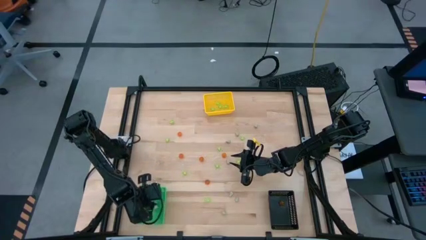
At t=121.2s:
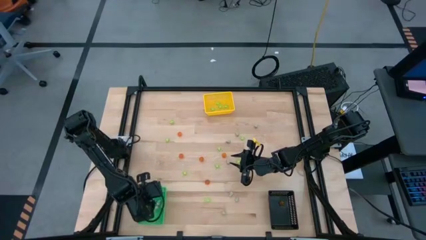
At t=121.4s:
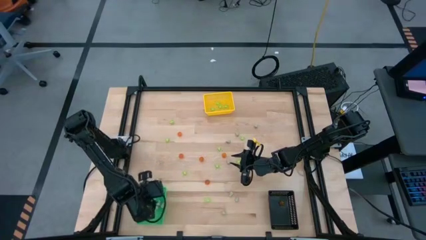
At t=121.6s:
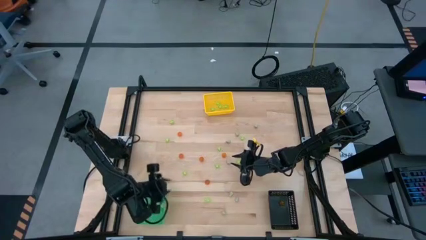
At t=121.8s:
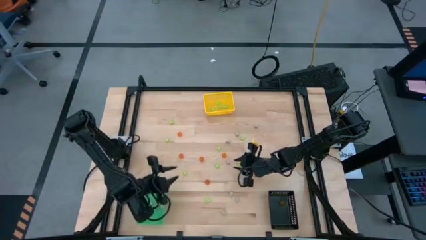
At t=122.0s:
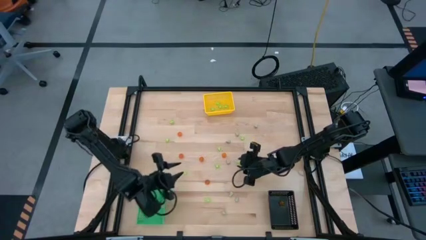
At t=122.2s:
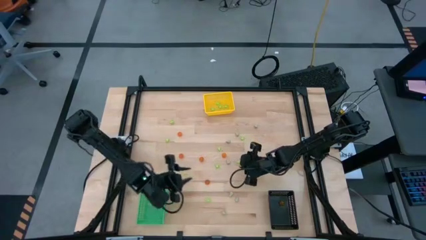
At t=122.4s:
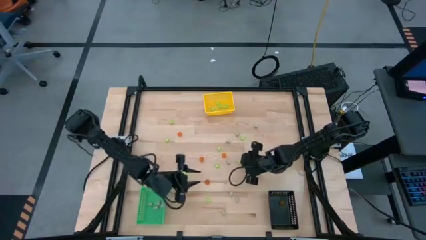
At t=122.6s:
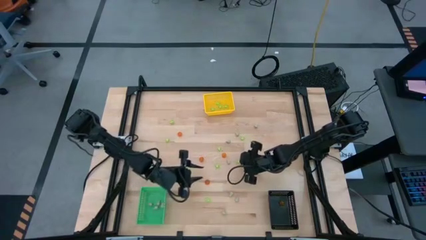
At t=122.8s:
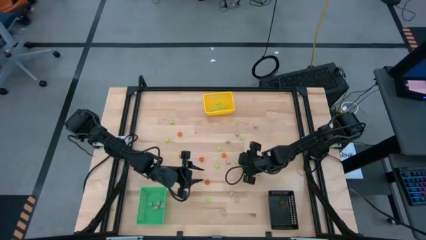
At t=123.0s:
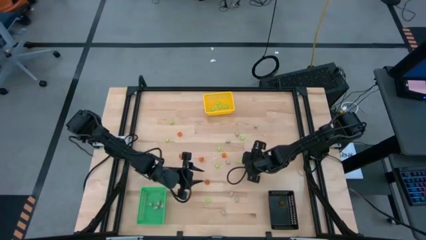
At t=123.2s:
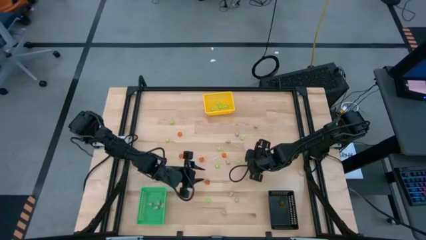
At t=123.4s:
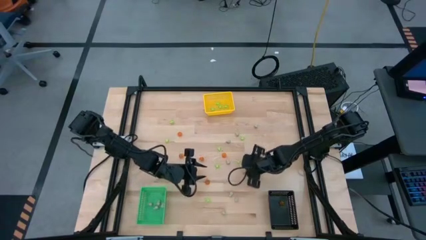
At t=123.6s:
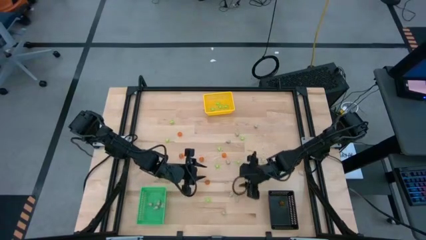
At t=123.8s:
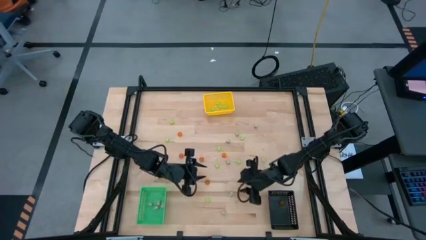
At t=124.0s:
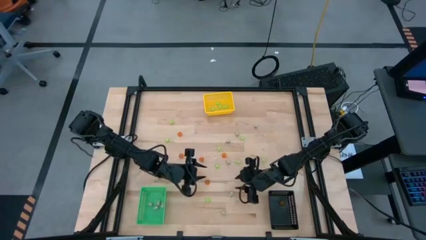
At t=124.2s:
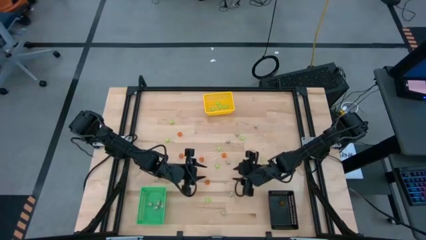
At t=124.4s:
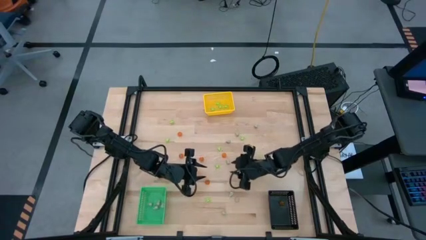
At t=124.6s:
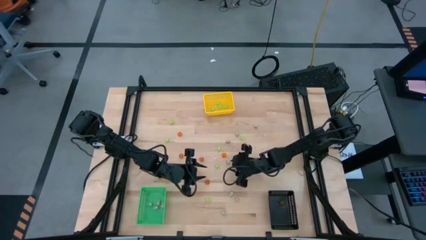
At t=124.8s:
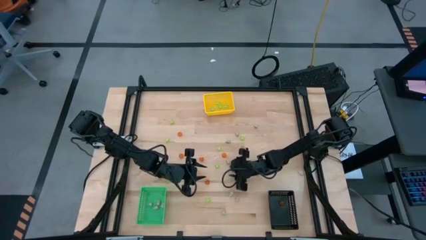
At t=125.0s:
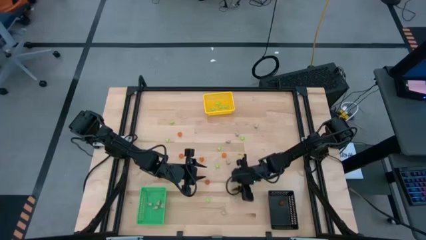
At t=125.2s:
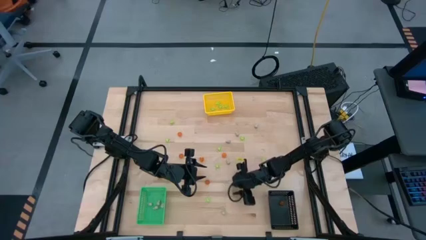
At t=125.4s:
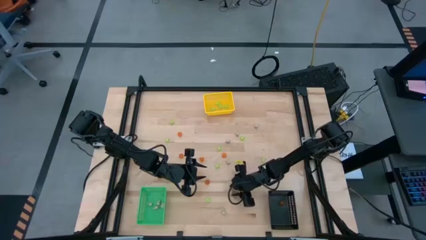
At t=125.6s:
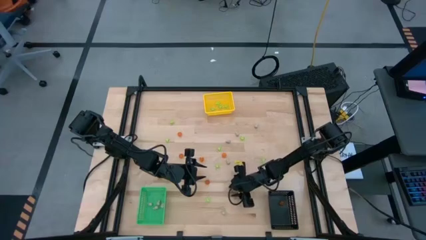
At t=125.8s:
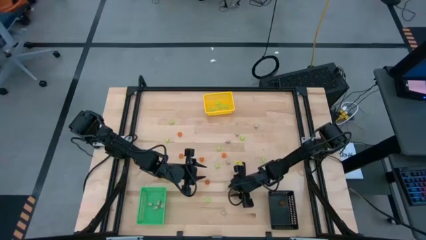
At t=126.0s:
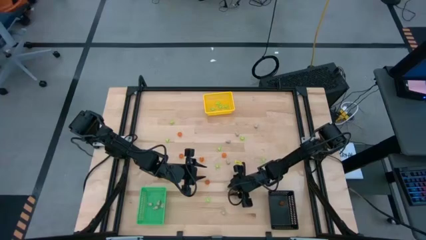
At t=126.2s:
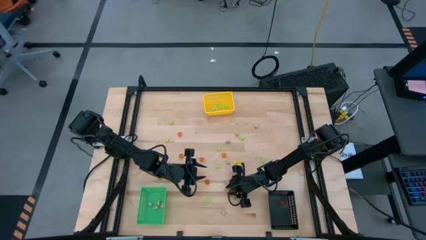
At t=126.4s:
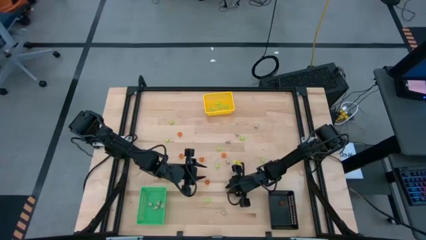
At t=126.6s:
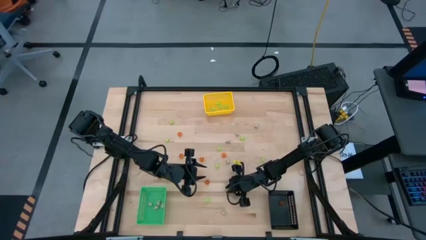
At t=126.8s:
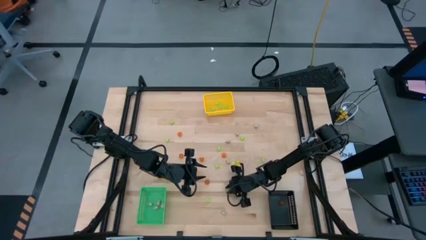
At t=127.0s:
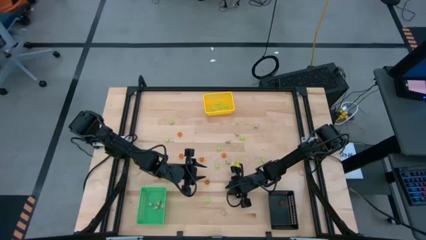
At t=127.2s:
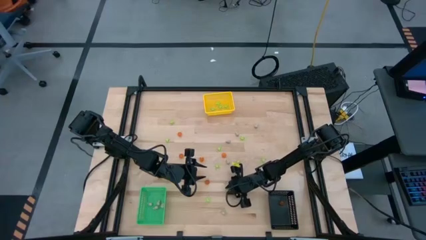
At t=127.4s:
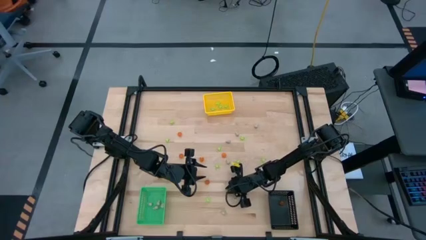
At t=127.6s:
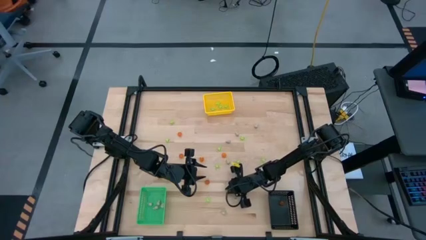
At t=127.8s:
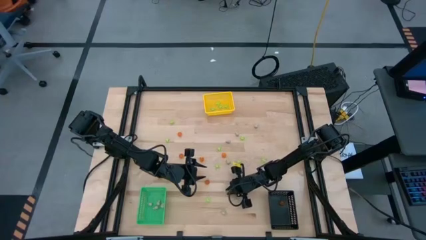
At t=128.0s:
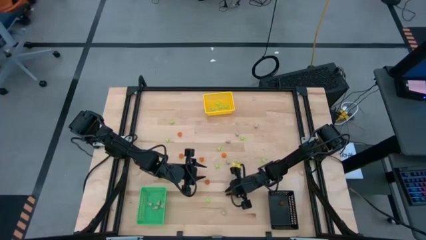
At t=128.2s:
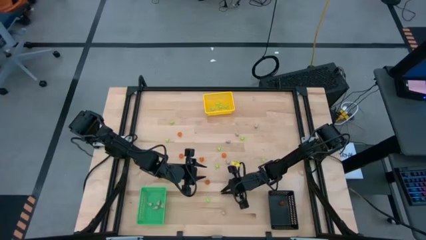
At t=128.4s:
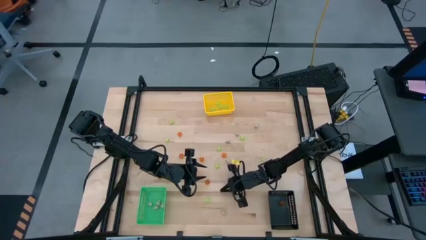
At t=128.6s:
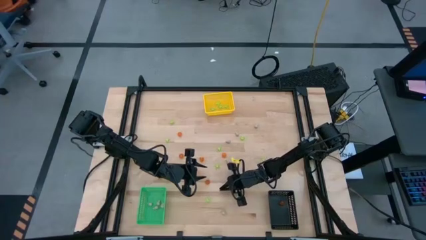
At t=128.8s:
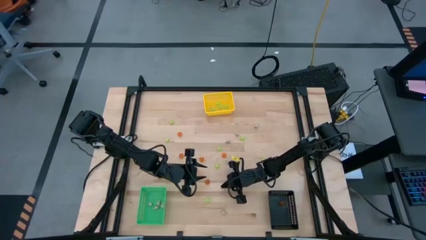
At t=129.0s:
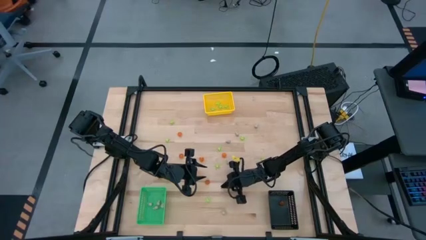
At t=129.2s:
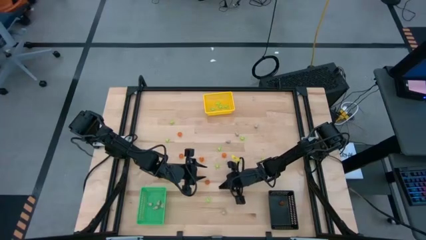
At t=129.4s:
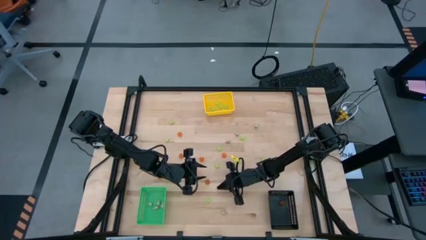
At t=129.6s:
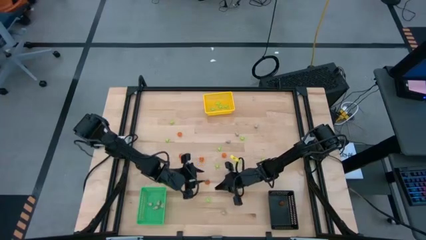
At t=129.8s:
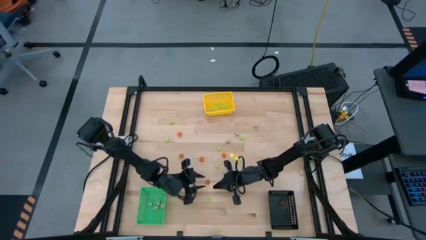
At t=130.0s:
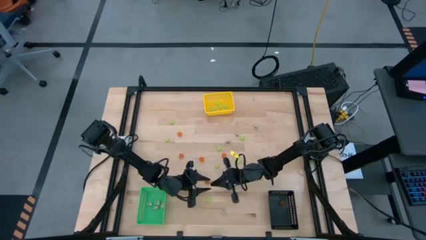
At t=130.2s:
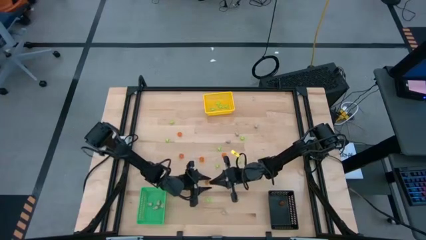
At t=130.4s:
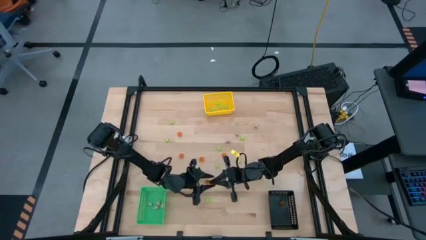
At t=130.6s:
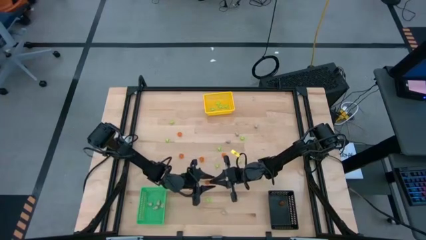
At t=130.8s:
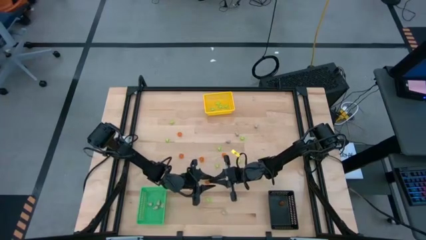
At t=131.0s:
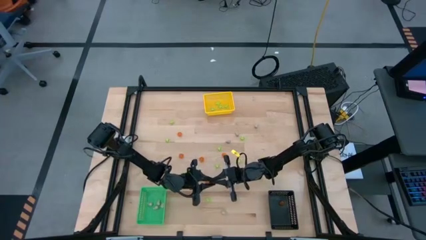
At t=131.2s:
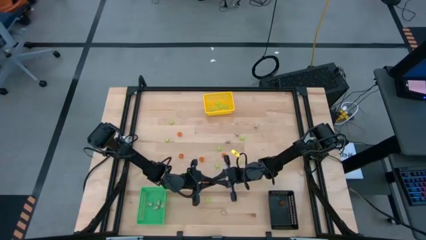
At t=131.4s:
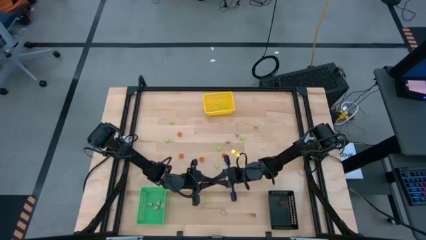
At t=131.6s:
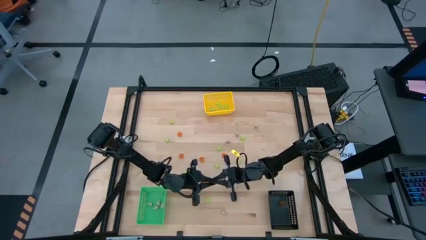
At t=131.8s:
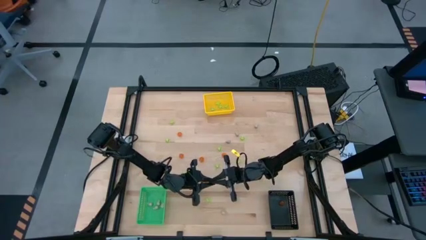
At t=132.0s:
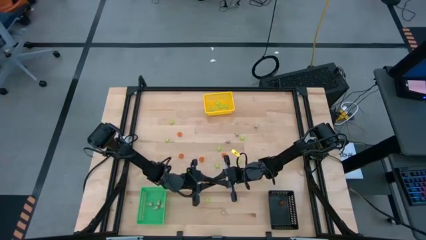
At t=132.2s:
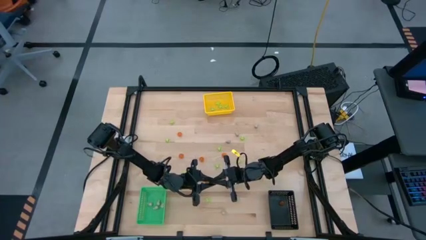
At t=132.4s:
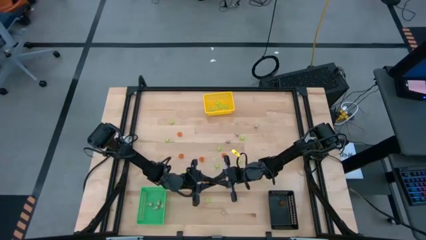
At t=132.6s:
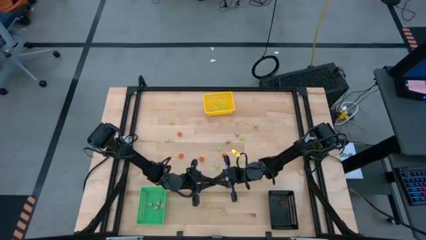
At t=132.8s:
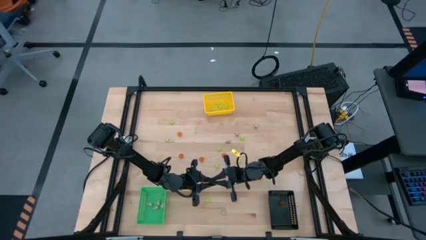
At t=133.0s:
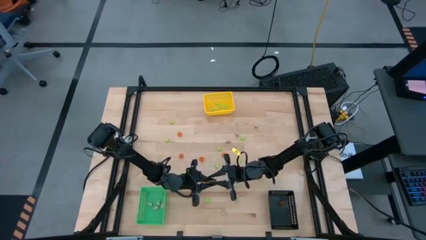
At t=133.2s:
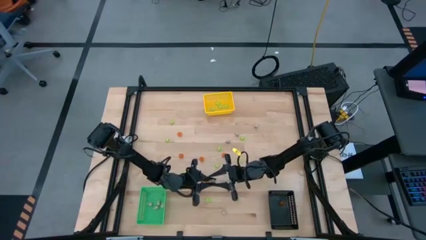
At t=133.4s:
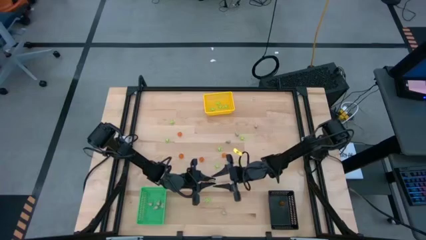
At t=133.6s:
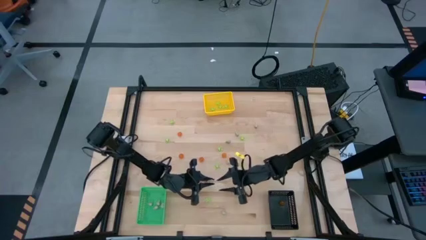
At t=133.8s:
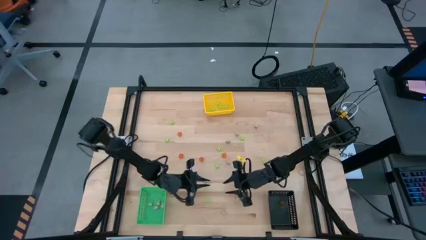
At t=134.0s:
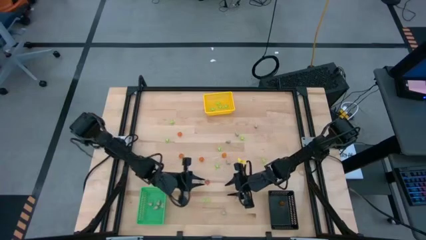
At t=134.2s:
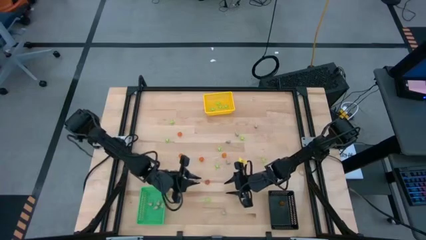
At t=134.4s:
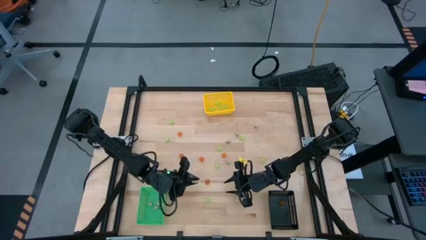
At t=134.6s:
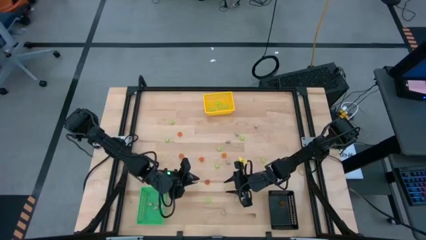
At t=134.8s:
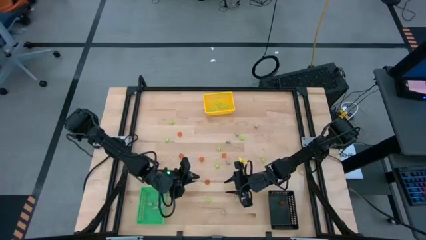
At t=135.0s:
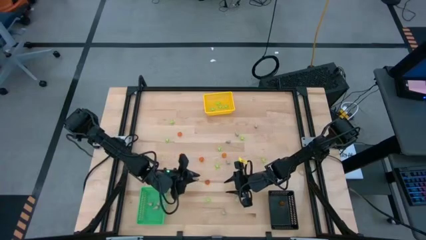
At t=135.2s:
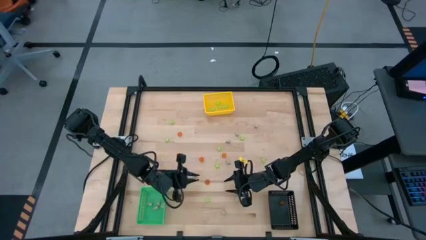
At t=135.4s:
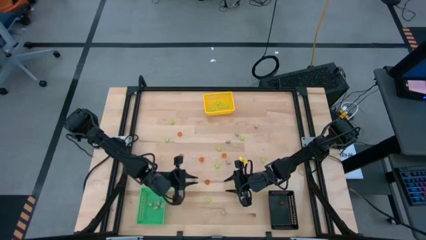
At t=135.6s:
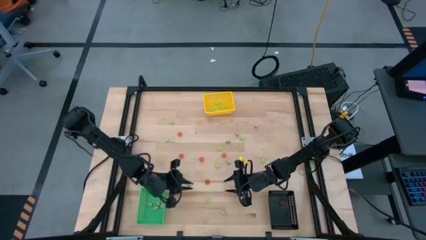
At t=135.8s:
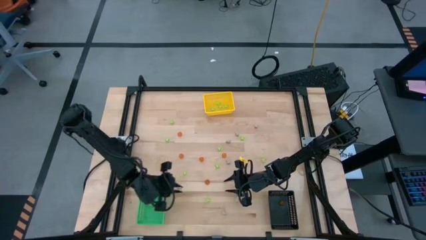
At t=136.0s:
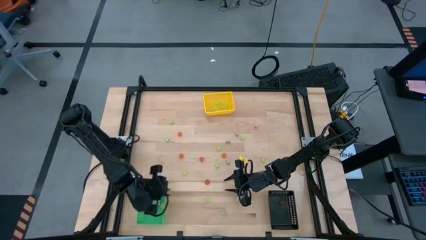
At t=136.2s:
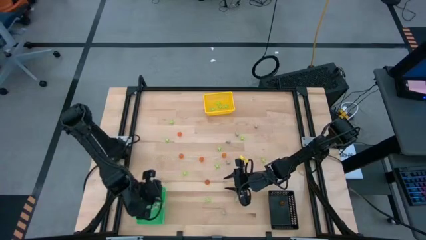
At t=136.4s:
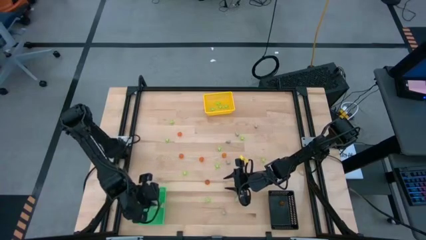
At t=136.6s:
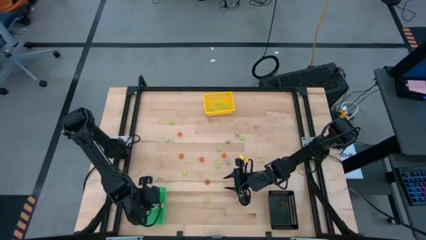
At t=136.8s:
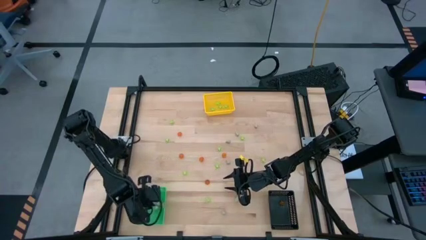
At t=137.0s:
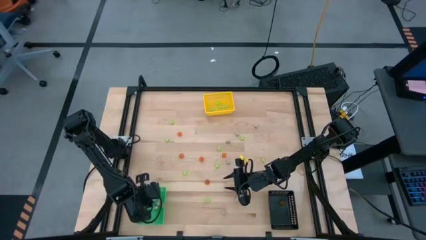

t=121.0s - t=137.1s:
Task: Sort Halloween decoration
Put the white skull toy into the green bin
